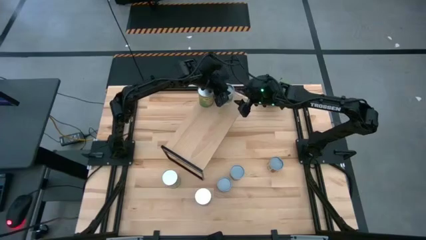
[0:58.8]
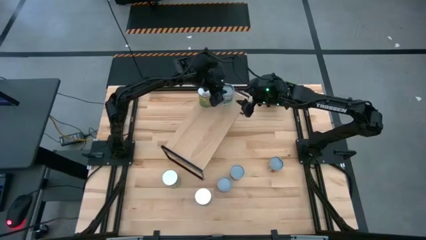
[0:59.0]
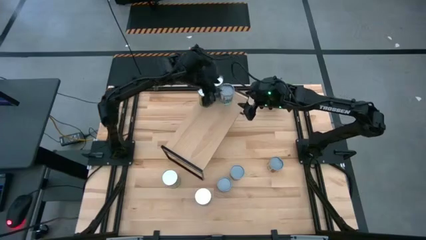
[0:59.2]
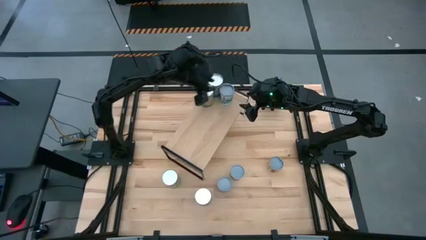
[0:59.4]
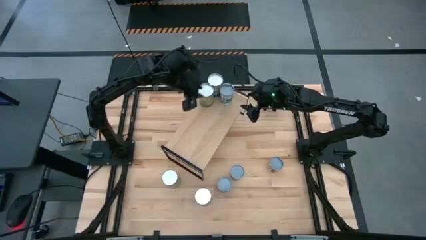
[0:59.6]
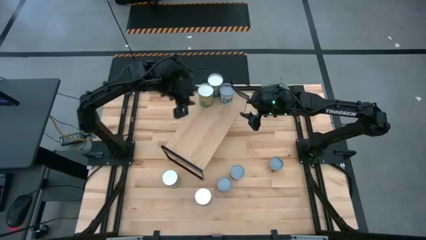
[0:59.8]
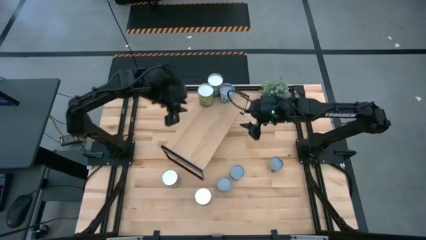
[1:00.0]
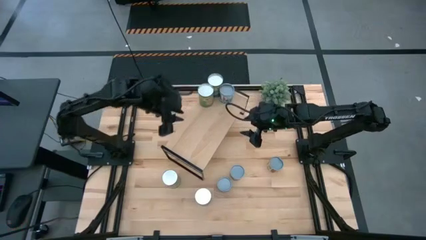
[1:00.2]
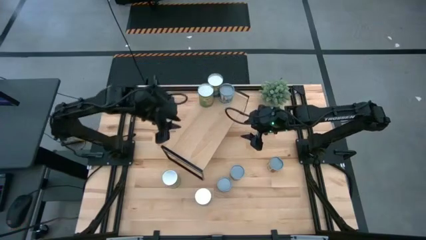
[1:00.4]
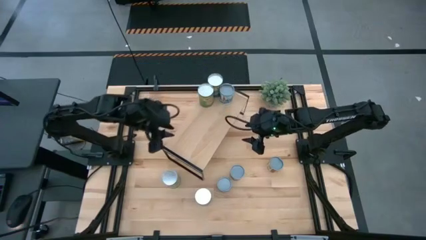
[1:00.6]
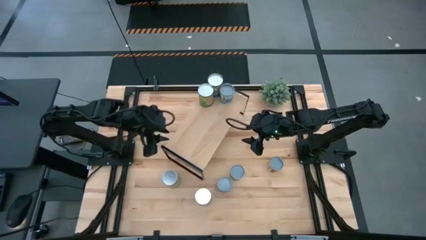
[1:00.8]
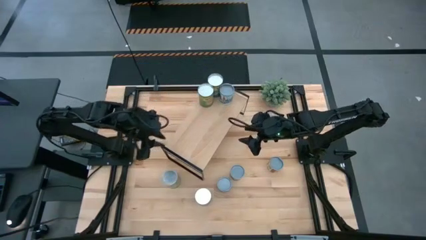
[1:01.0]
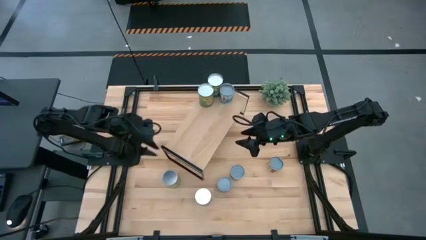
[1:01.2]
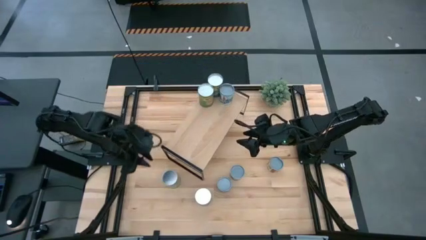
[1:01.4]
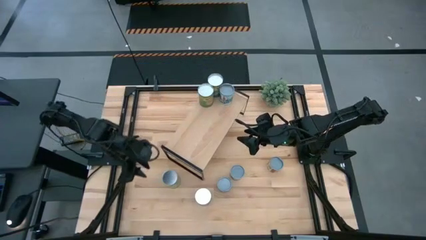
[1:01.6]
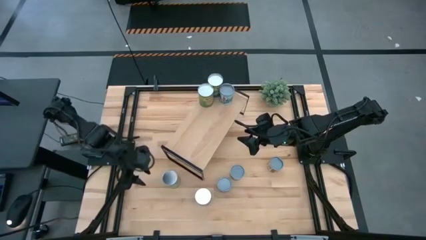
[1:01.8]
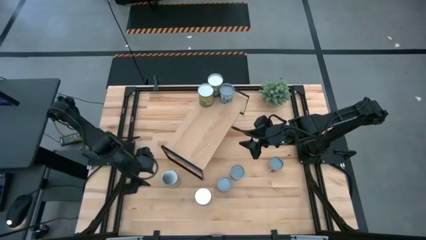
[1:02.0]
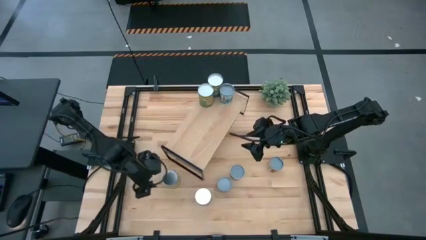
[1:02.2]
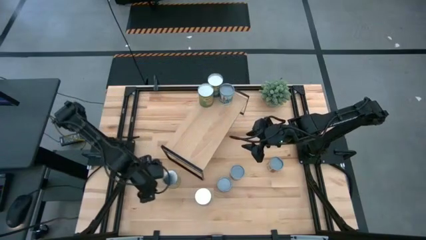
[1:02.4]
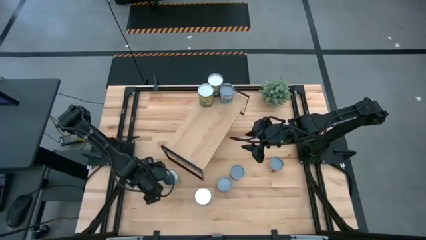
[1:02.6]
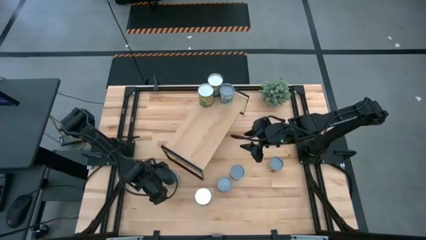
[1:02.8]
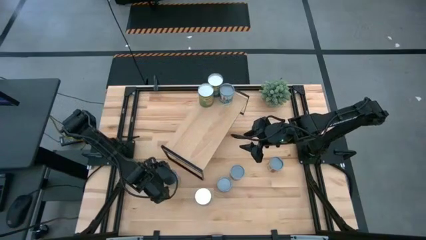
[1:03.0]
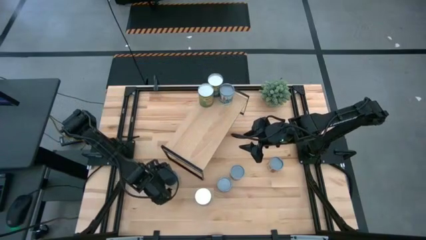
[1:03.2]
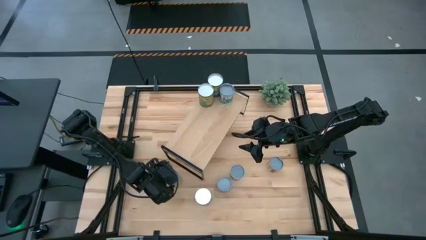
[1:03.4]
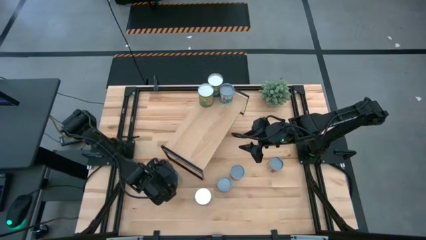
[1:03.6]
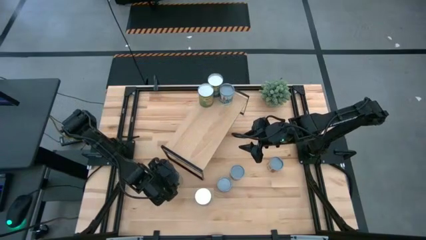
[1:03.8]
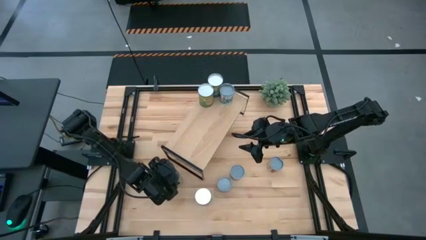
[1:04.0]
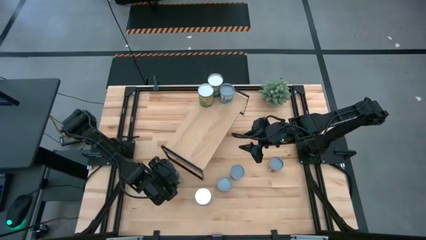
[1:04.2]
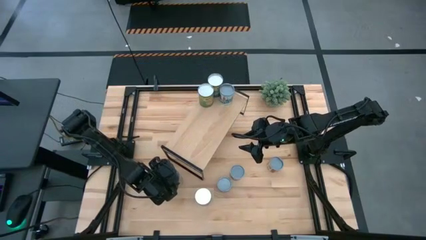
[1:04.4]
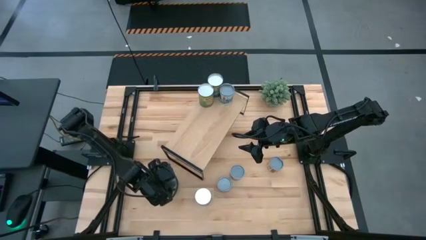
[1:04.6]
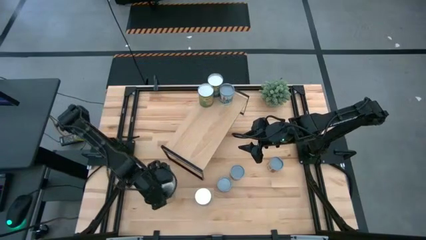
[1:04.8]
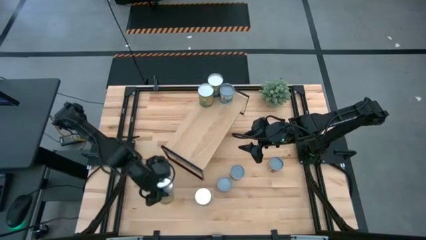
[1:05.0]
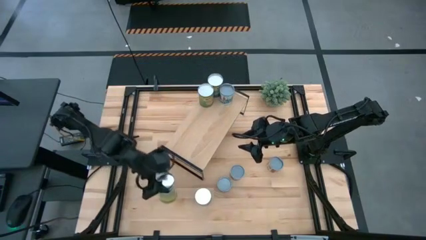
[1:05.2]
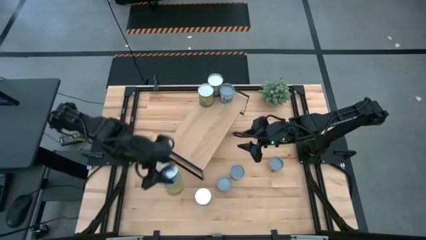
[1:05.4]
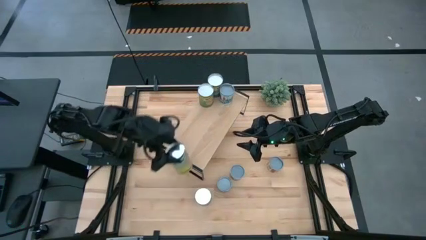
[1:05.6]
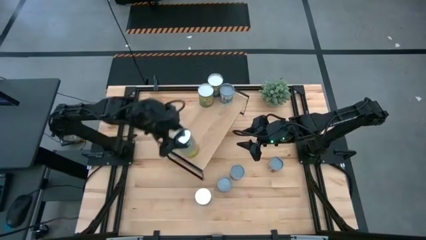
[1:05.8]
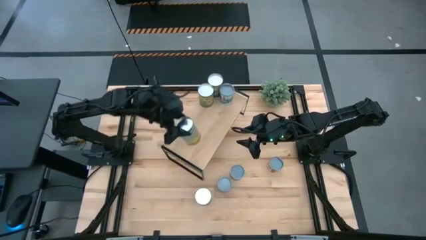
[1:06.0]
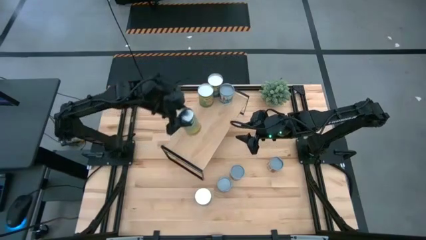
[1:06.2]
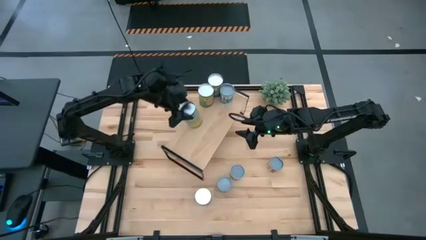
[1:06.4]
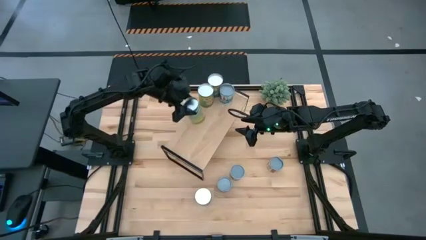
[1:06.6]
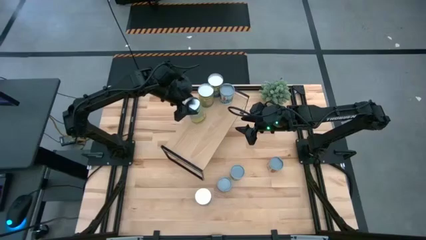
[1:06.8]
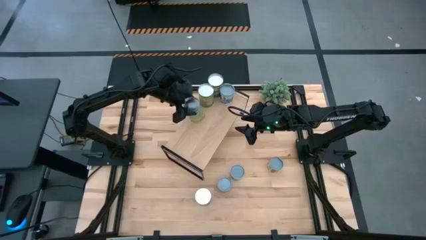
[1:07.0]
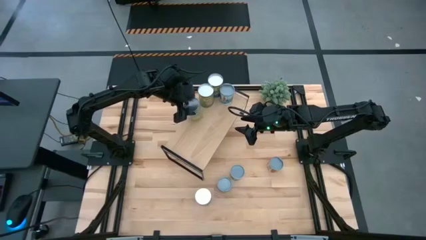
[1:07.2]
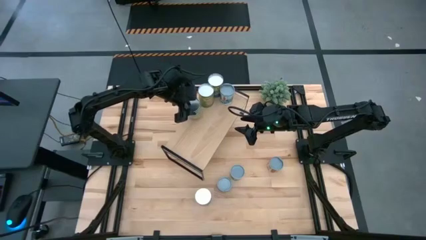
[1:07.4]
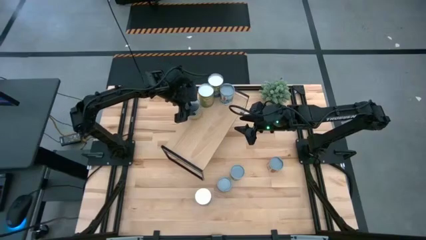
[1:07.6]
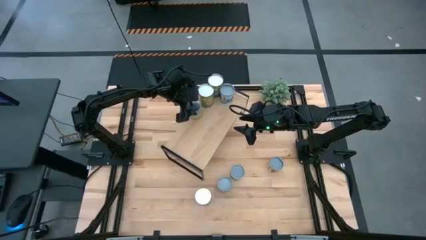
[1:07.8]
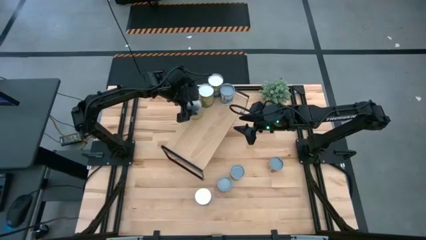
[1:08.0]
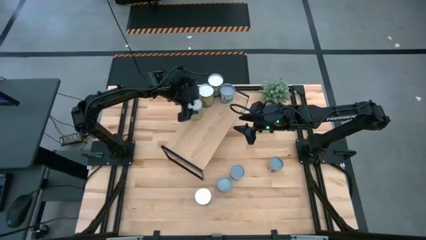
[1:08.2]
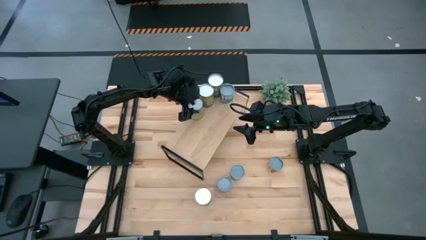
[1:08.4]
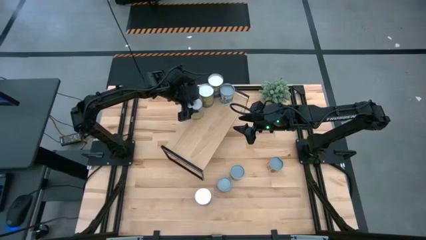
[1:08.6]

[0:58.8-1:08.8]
Task: Pick and place cans onto a shelf
Put the canned carrots on the shelf

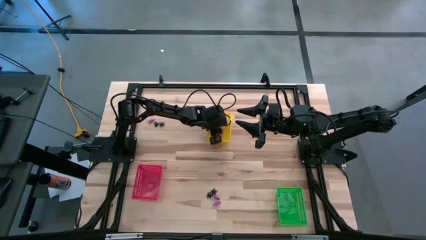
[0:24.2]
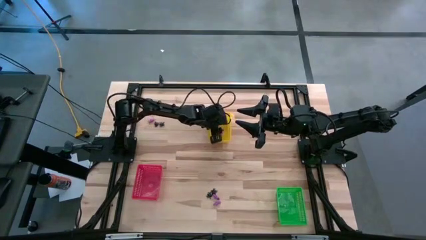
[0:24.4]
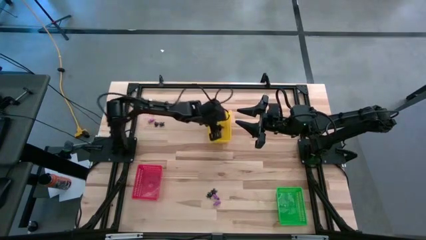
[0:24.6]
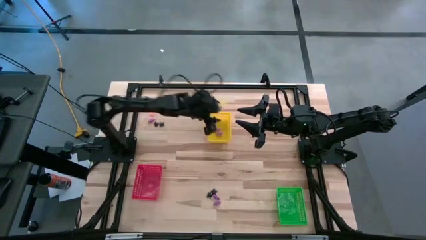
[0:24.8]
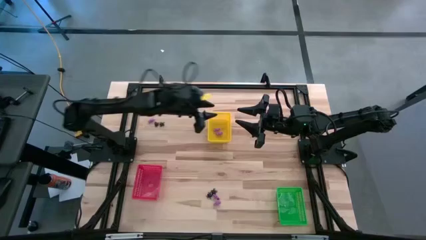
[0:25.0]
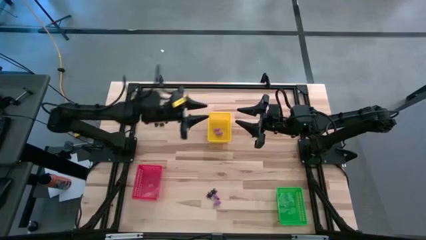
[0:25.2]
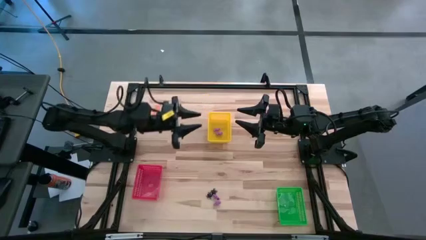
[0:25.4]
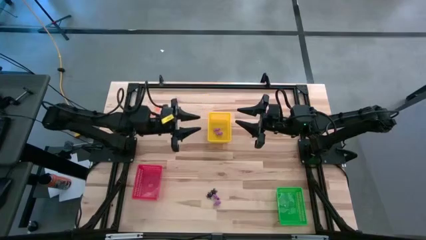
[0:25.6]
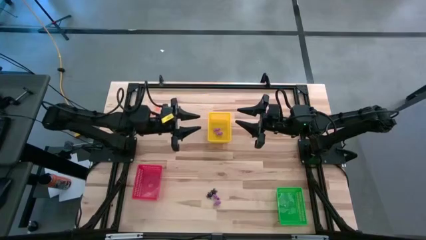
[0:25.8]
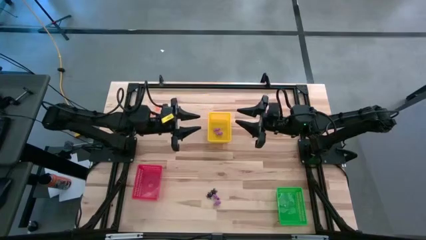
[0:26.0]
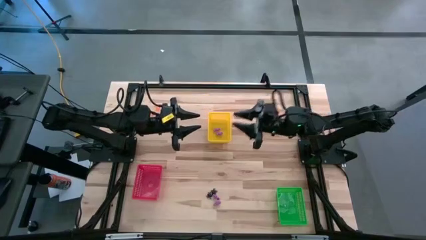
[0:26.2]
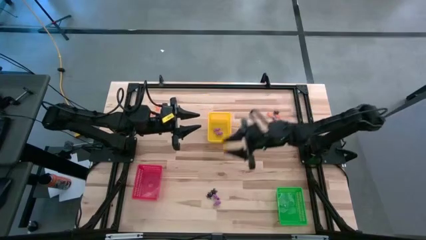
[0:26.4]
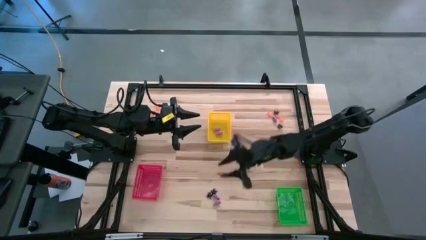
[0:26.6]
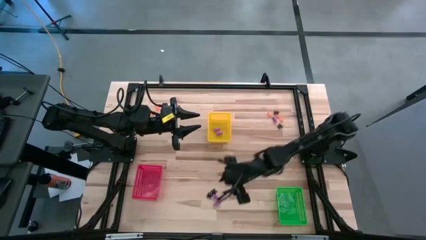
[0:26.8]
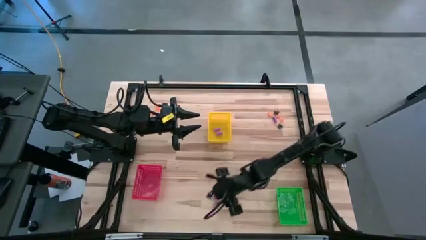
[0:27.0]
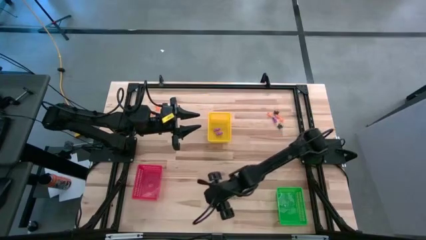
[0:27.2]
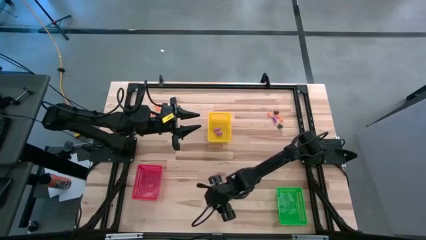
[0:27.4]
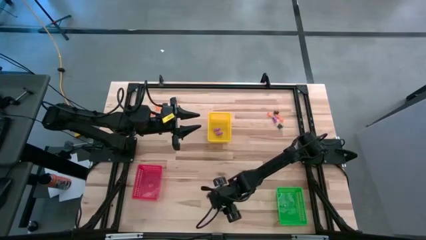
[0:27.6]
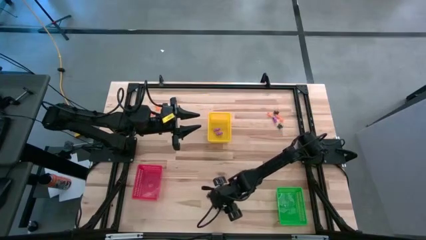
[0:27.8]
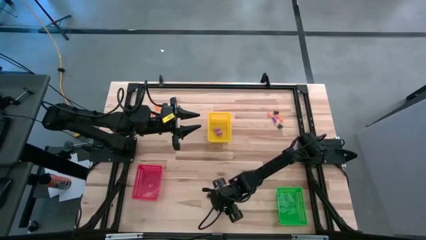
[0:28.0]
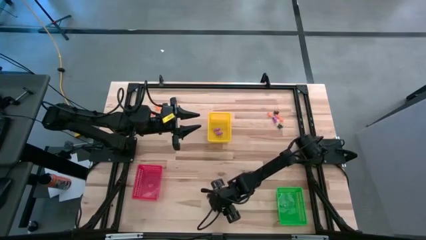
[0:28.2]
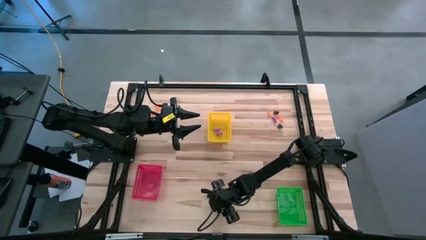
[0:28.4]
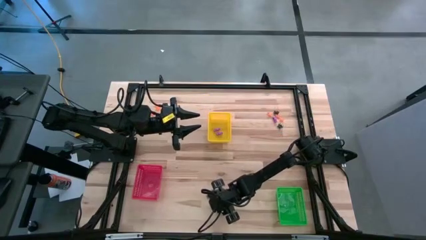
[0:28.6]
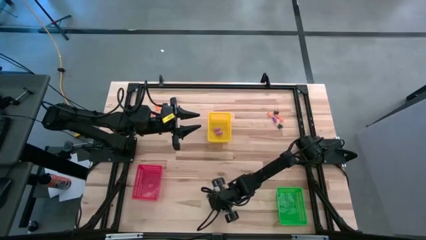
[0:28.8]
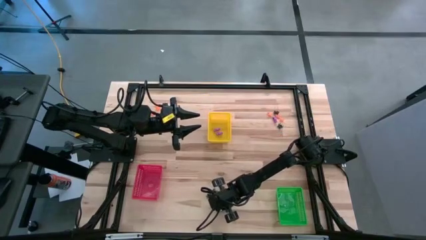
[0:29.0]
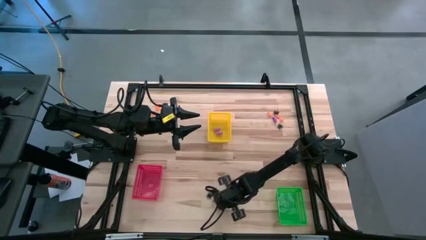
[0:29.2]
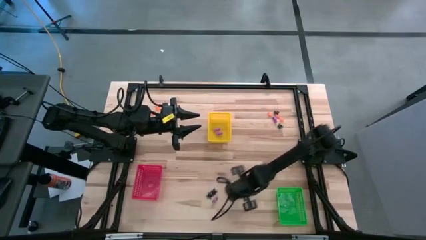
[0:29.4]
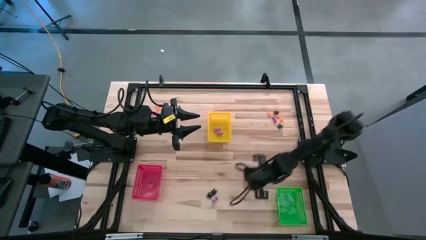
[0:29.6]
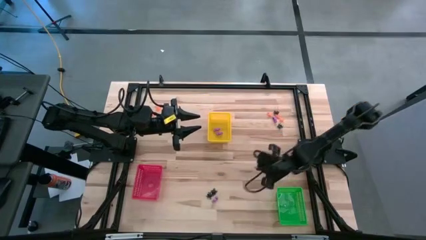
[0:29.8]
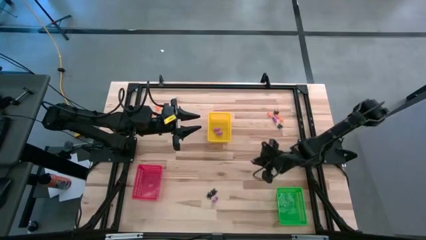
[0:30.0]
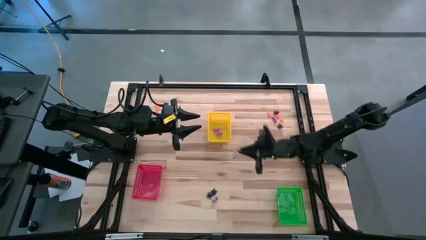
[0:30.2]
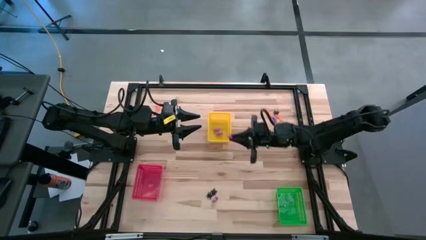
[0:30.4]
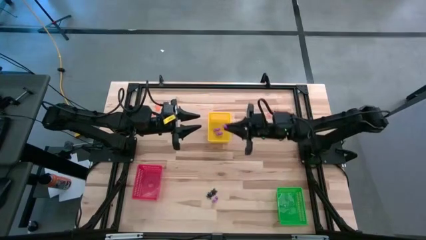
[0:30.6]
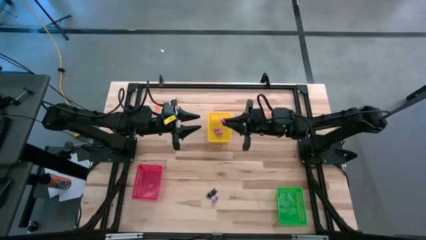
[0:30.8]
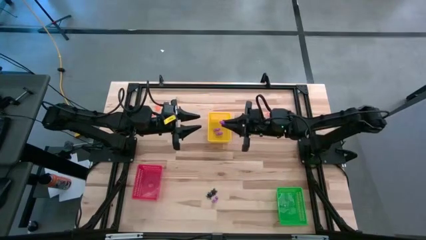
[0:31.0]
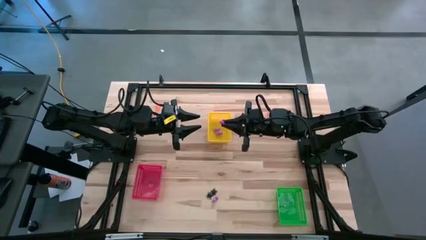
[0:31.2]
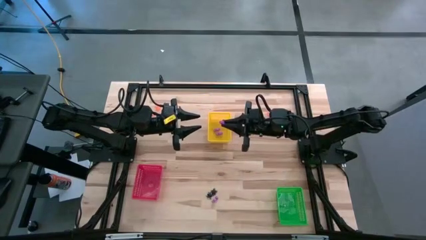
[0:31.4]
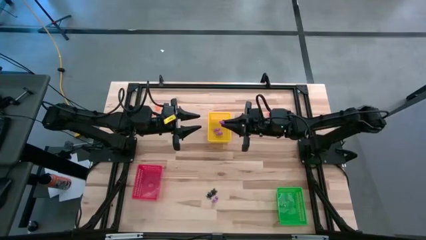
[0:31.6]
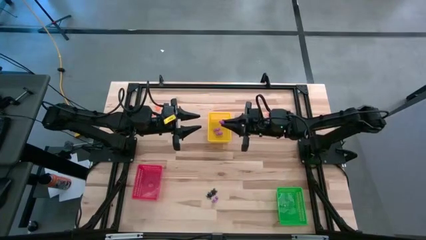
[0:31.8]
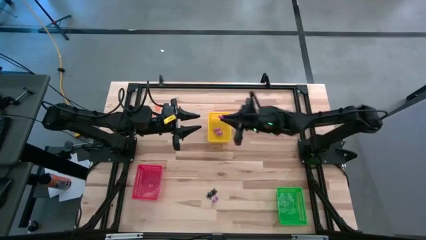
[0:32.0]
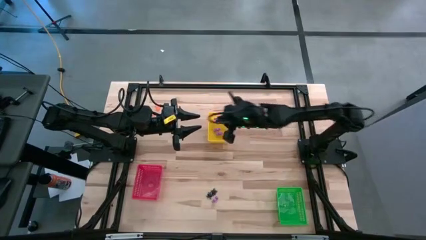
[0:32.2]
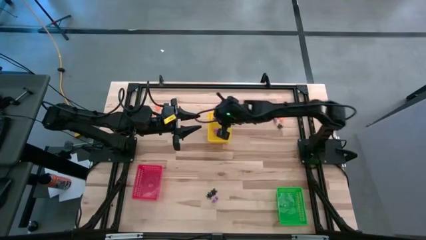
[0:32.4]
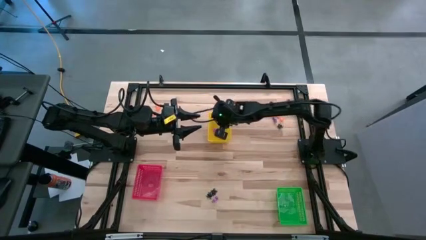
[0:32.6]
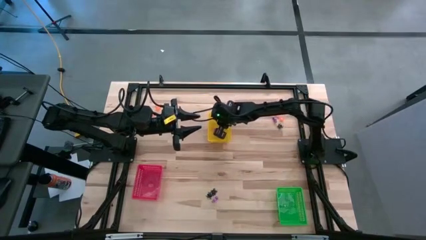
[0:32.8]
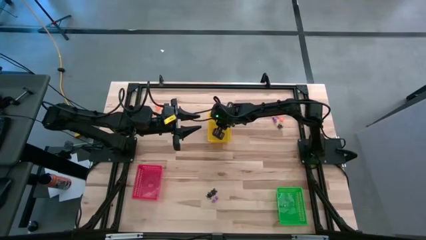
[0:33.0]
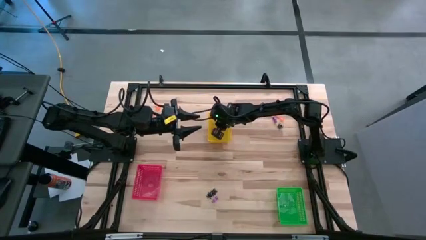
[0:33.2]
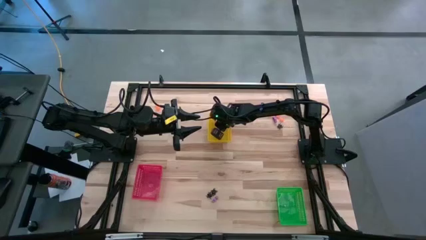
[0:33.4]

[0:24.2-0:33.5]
Task: Sort Halloween decoration
Put the skeleton toy into the yellow bin
